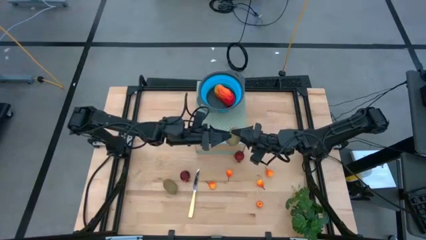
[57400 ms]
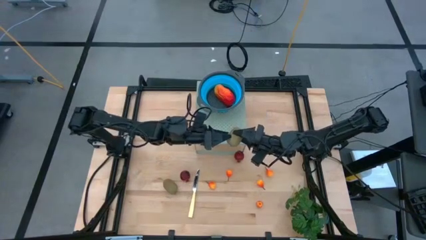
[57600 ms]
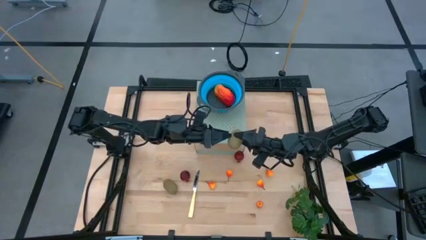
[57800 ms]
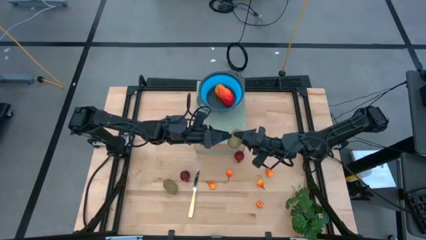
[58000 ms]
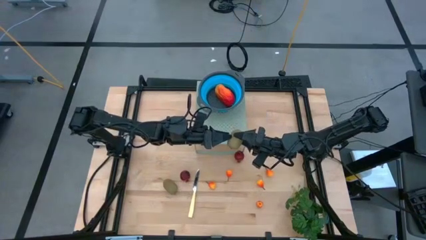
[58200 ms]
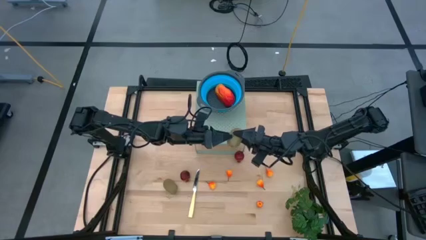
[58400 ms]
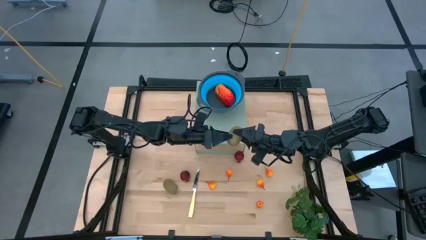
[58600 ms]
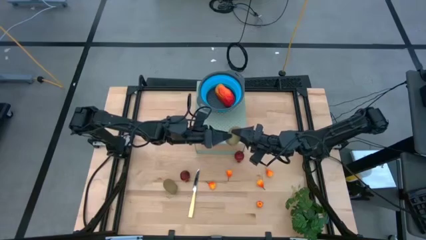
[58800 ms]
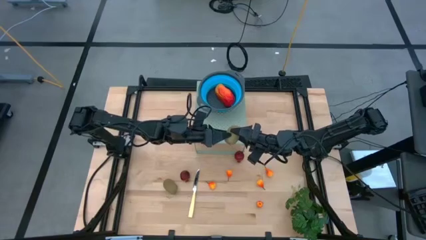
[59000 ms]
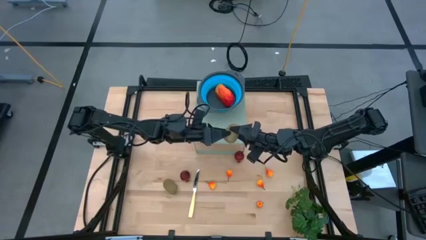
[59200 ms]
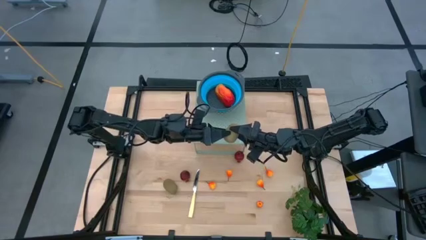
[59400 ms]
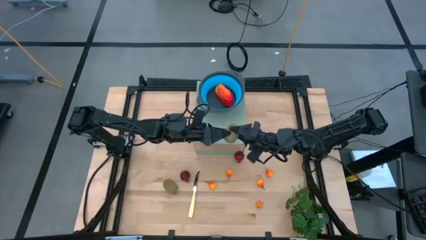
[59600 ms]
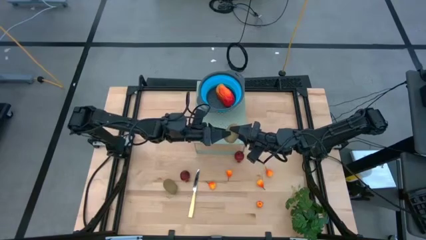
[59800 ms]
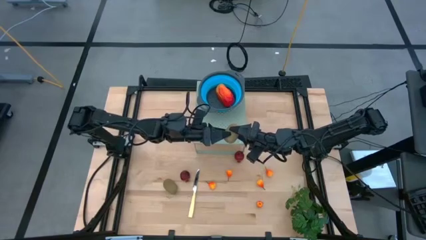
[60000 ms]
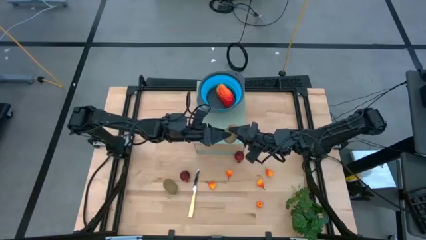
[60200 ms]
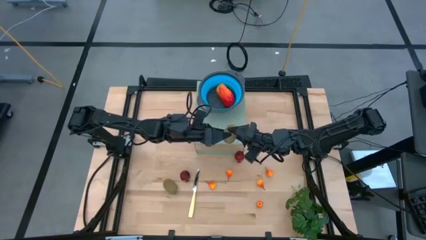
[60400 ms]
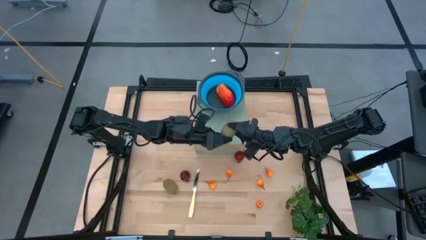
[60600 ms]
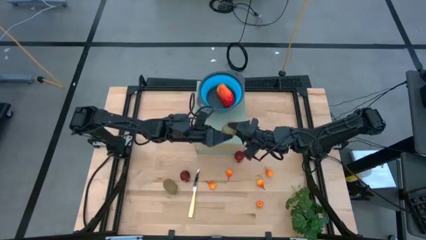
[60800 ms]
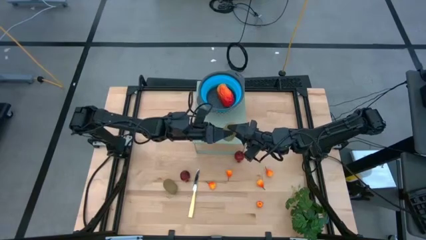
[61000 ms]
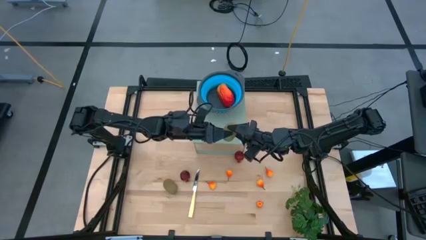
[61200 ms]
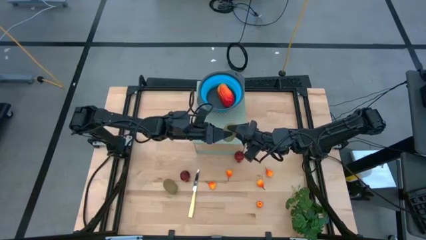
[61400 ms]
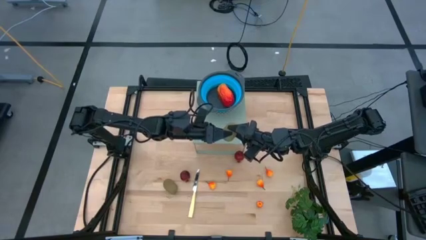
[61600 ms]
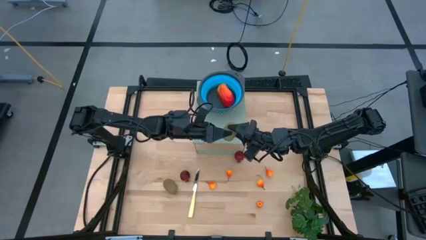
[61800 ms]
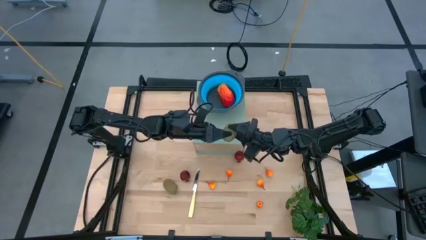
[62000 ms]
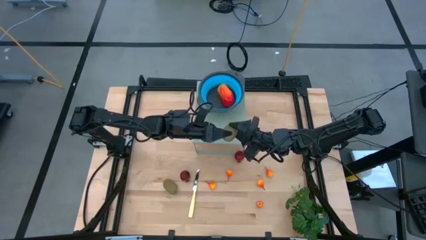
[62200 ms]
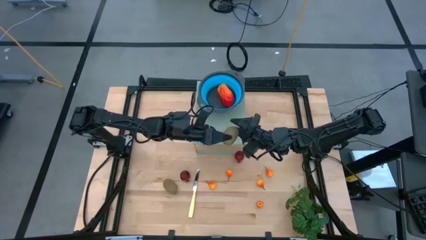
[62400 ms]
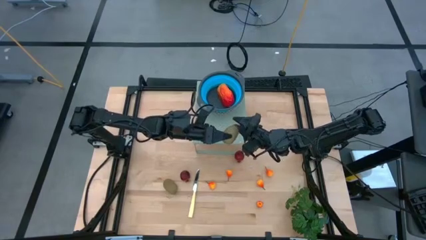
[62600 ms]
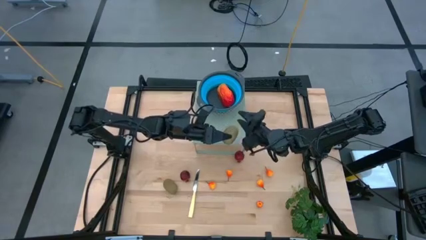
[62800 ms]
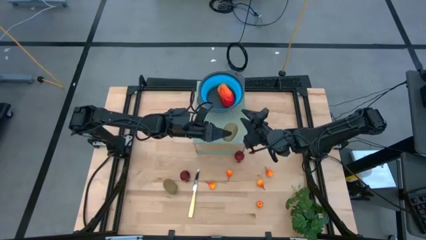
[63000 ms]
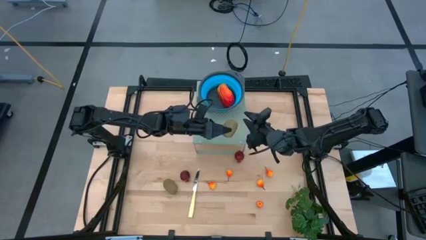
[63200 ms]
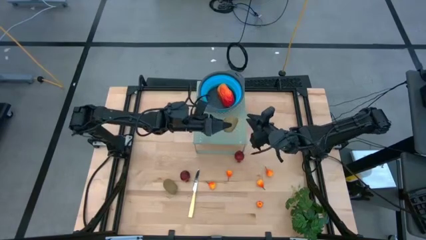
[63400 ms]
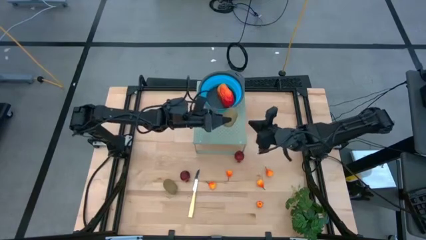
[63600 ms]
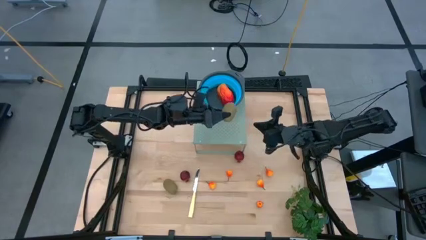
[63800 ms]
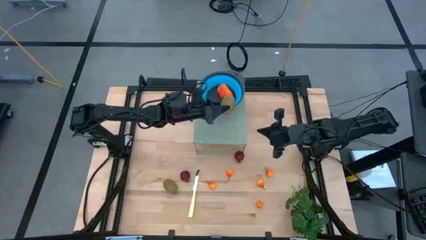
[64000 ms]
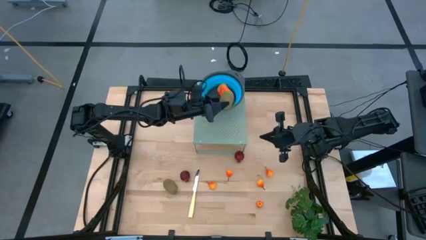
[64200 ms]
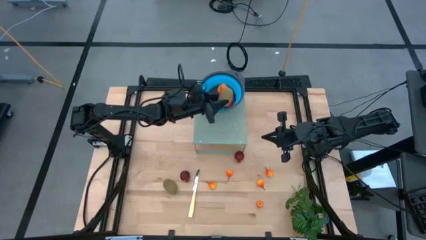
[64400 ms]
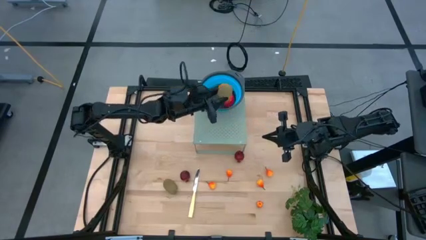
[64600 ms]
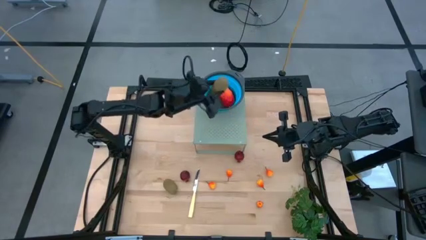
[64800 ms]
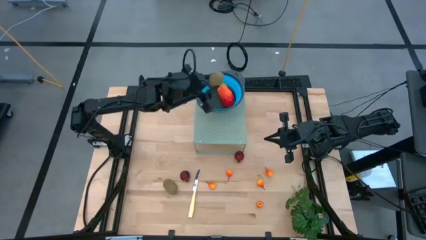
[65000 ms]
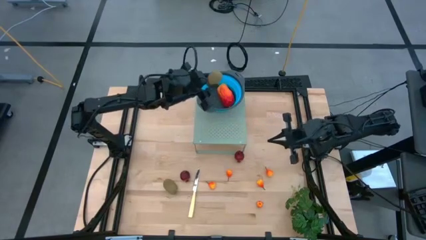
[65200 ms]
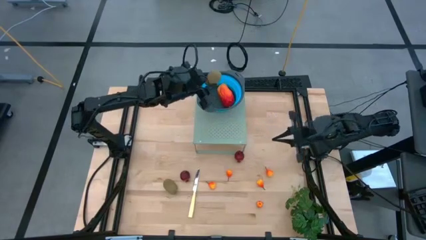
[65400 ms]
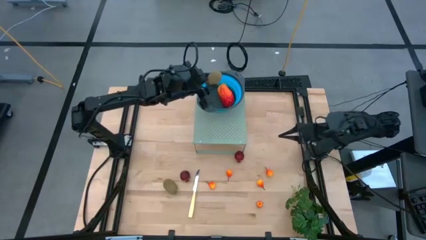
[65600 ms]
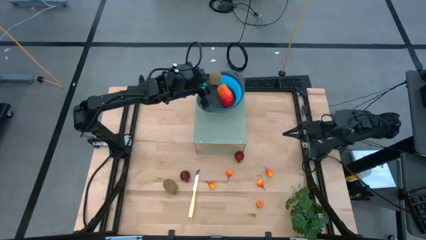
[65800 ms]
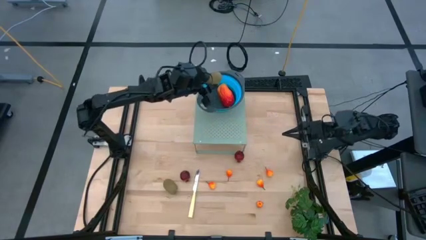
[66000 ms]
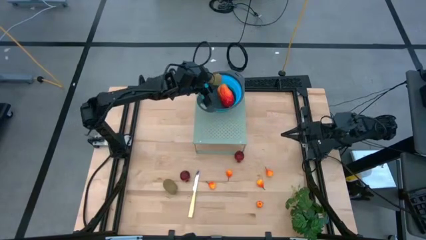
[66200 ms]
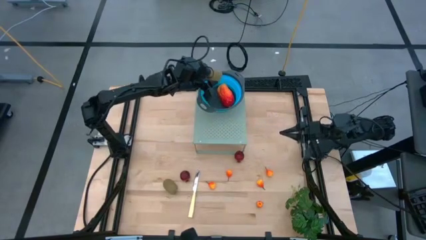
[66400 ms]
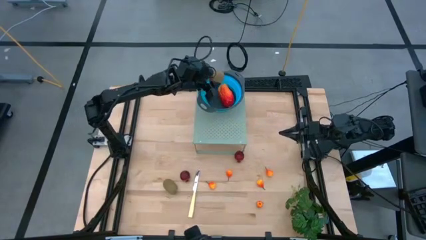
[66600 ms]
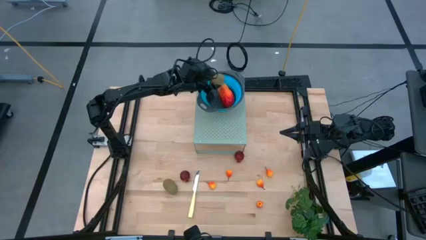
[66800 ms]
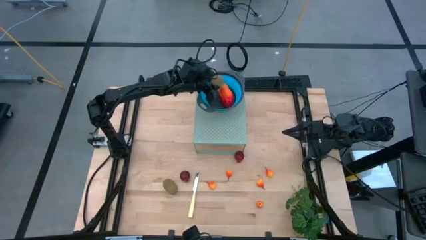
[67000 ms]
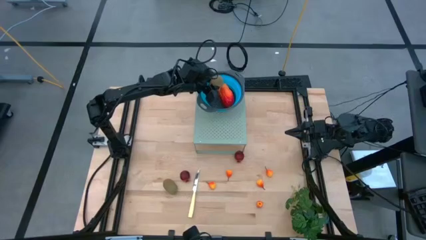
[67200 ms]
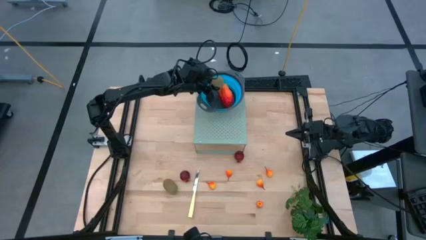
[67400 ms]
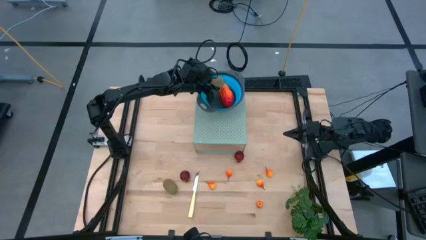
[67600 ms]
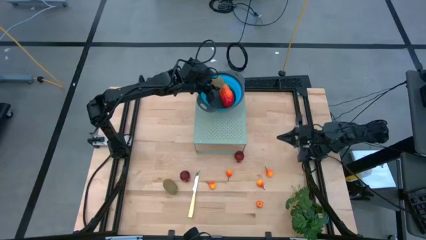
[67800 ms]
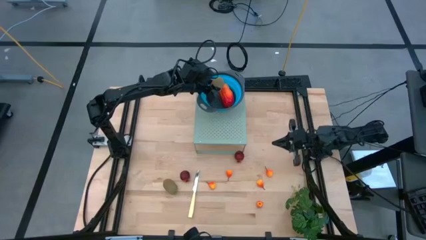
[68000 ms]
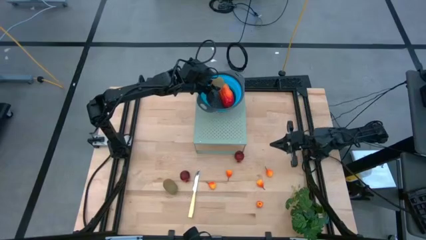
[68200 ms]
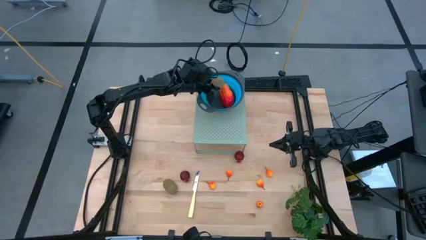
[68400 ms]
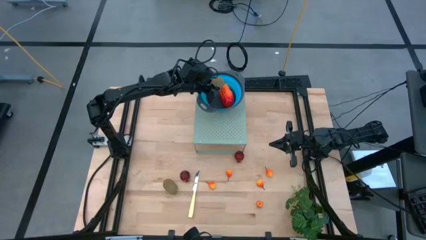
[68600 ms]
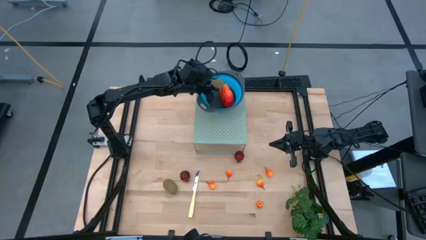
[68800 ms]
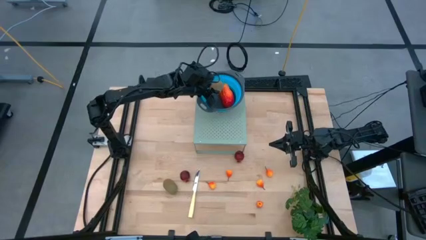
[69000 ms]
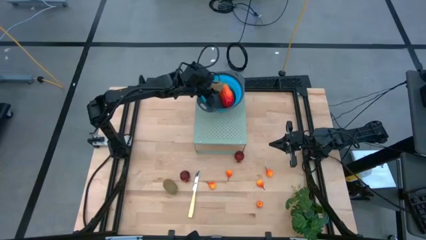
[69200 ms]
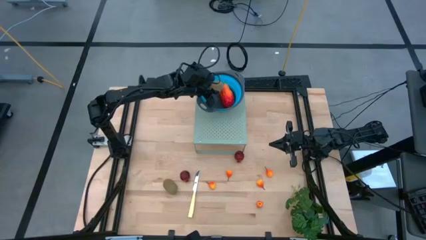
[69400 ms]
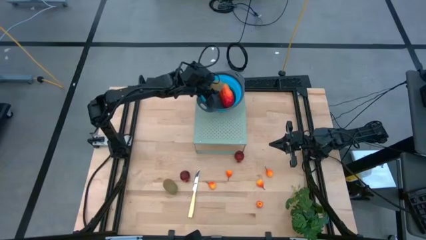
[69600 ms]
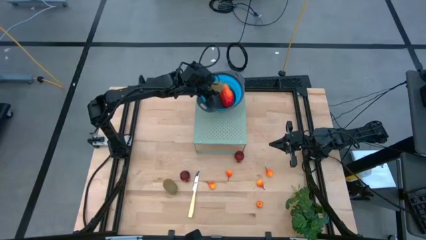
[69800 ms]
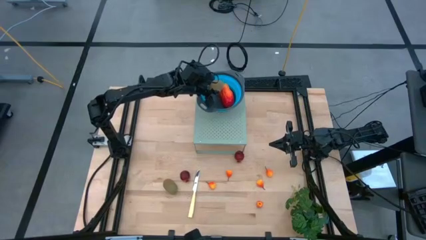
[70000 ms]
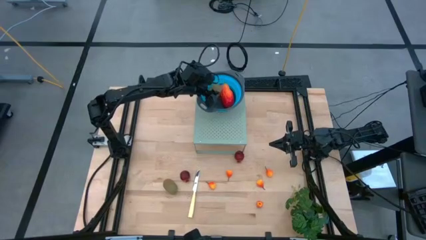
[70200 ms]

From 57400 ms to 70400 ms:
Task: Pick & Place Fruit
Put the kiwi into the blue strainer bowl on the shelf
